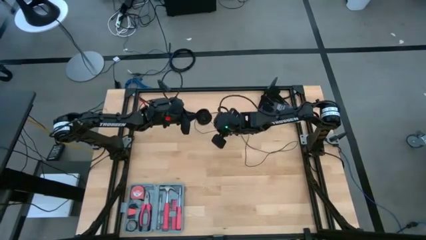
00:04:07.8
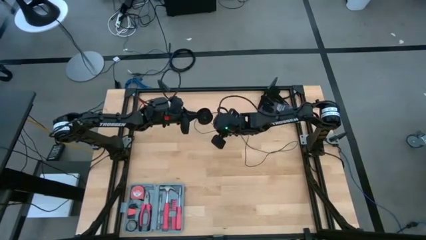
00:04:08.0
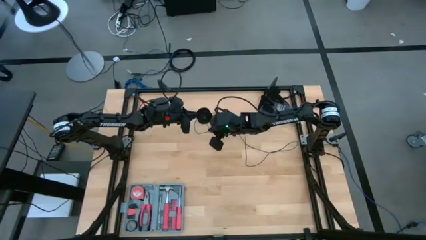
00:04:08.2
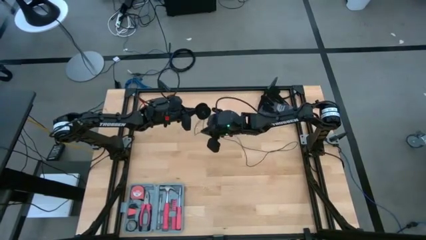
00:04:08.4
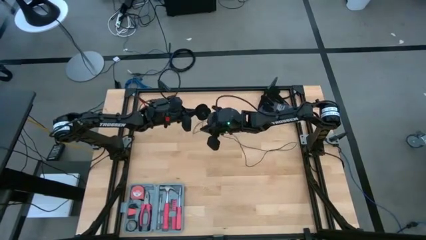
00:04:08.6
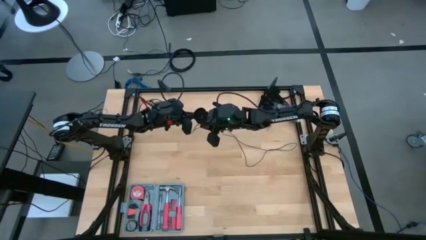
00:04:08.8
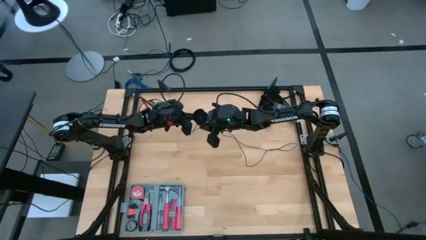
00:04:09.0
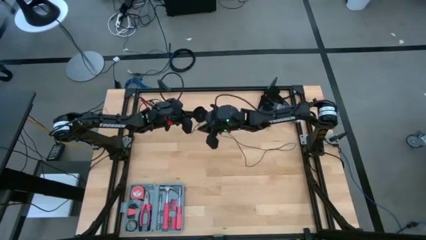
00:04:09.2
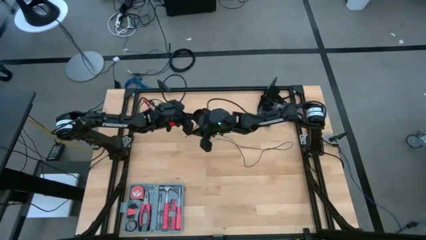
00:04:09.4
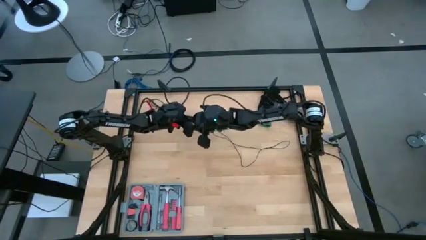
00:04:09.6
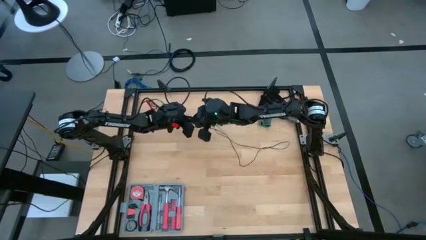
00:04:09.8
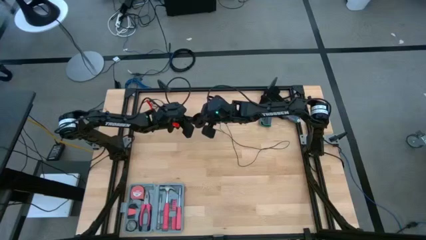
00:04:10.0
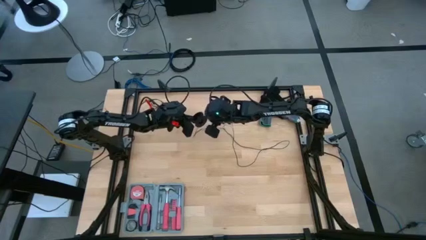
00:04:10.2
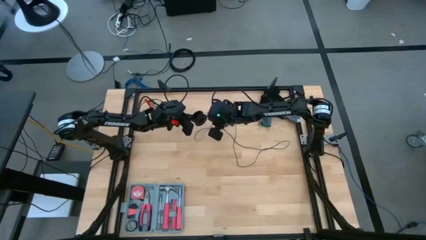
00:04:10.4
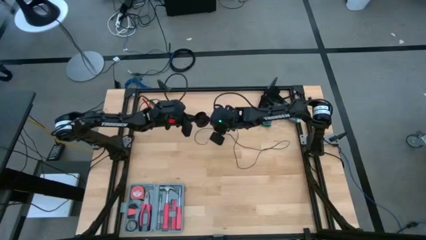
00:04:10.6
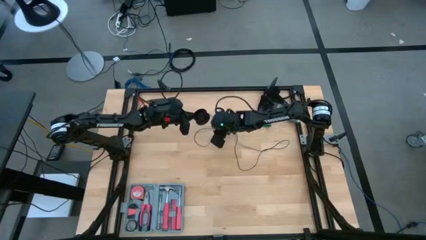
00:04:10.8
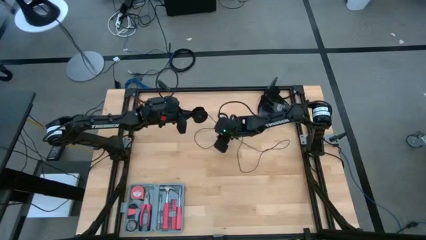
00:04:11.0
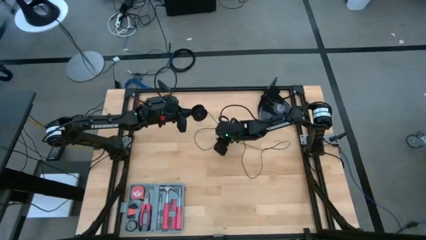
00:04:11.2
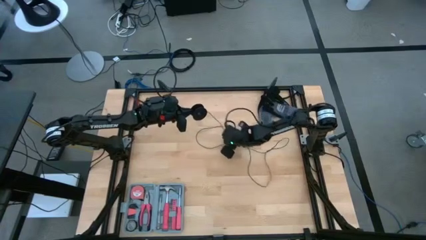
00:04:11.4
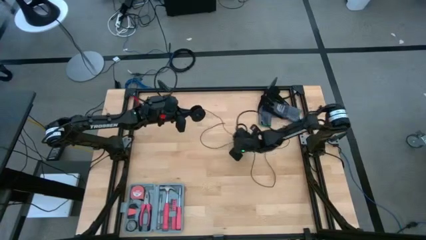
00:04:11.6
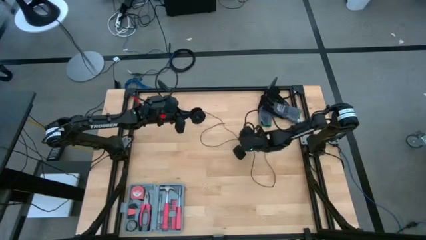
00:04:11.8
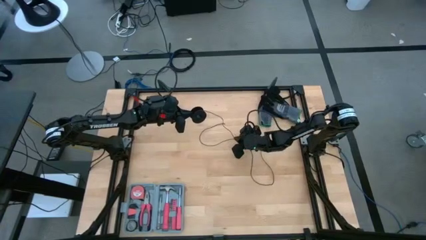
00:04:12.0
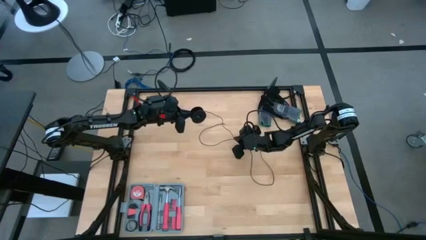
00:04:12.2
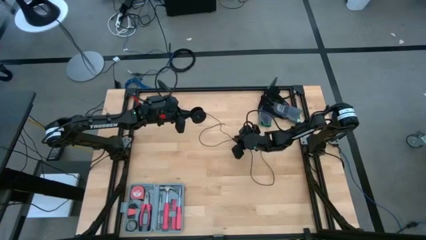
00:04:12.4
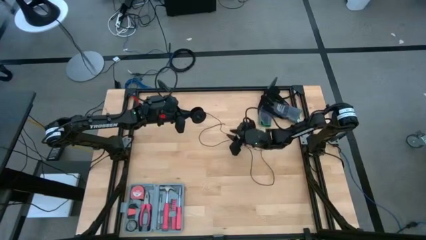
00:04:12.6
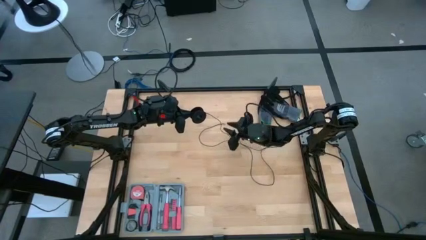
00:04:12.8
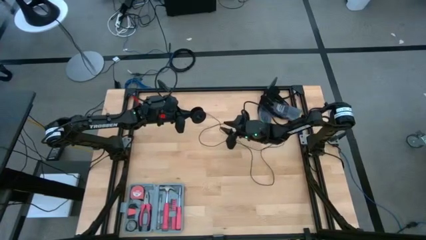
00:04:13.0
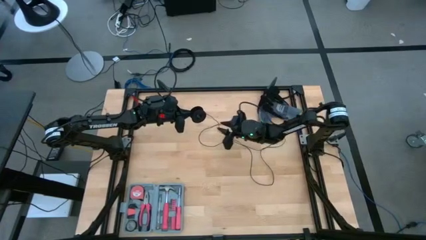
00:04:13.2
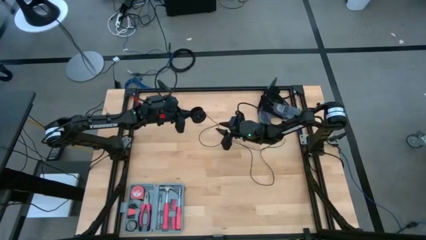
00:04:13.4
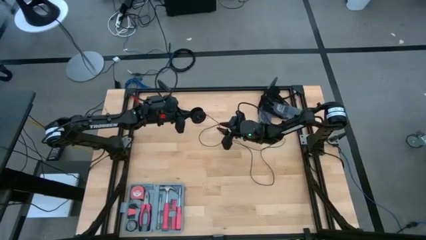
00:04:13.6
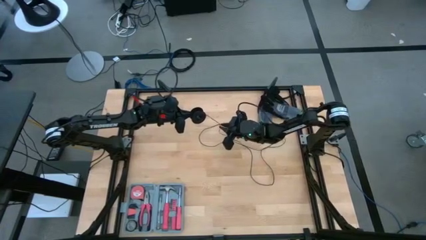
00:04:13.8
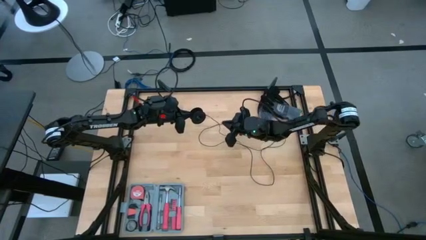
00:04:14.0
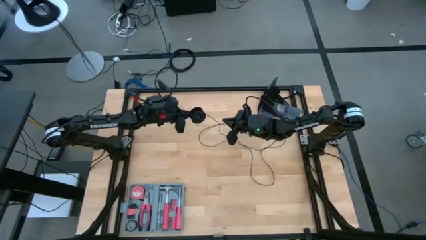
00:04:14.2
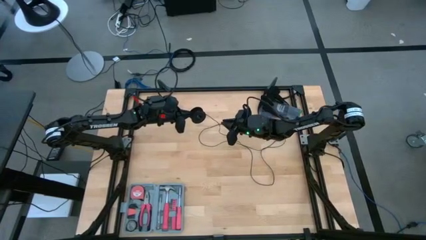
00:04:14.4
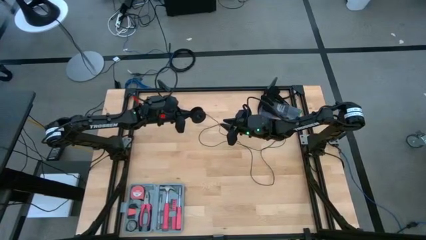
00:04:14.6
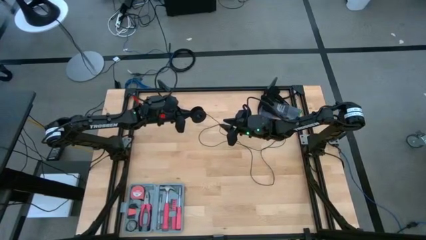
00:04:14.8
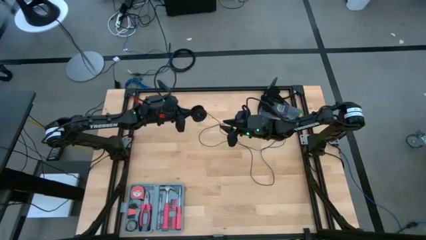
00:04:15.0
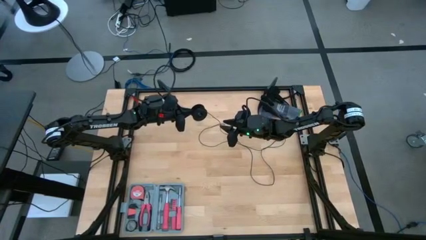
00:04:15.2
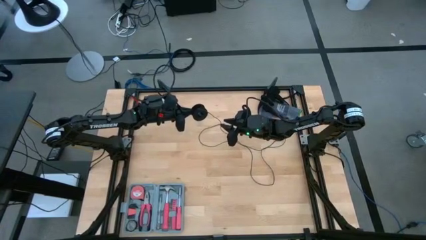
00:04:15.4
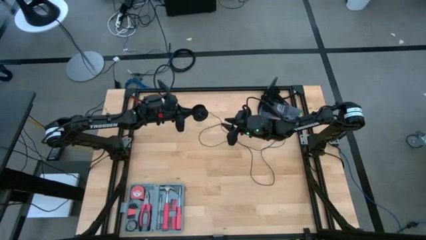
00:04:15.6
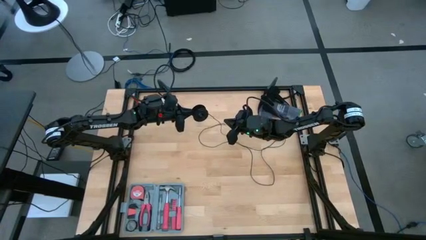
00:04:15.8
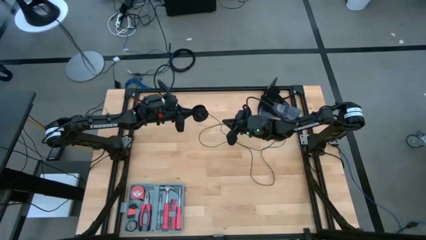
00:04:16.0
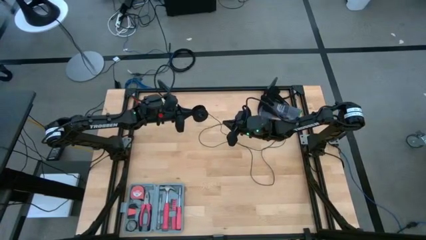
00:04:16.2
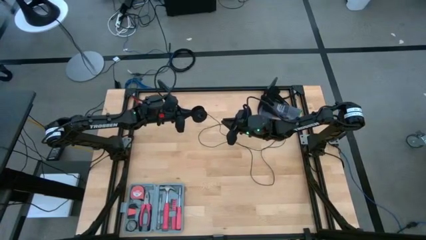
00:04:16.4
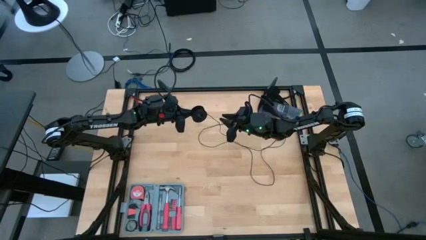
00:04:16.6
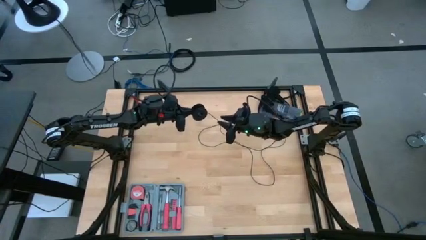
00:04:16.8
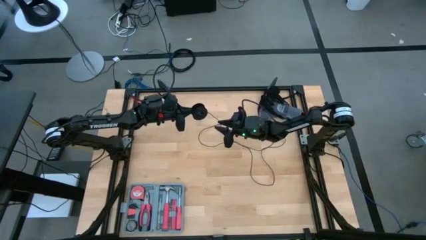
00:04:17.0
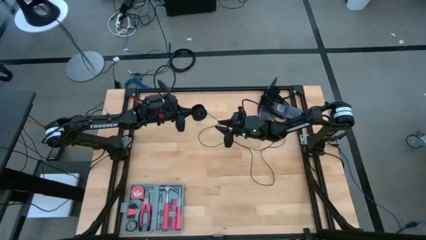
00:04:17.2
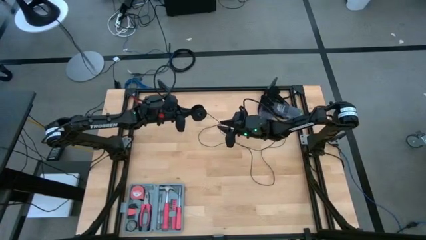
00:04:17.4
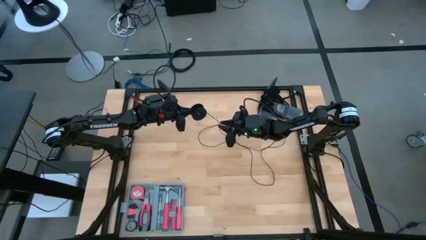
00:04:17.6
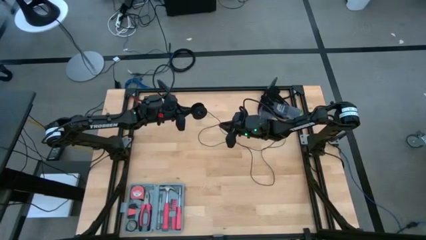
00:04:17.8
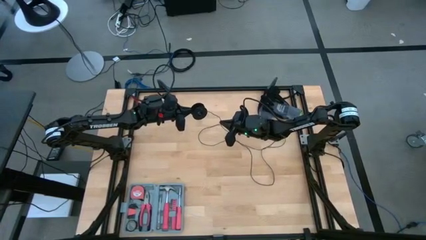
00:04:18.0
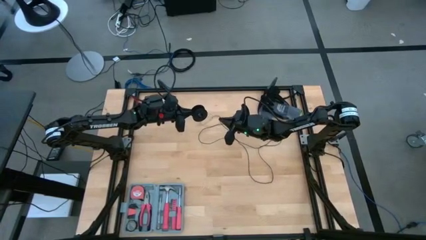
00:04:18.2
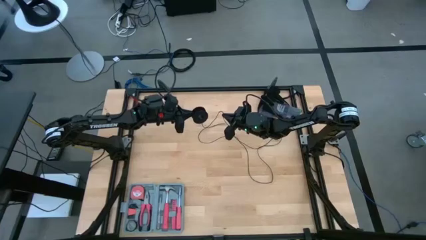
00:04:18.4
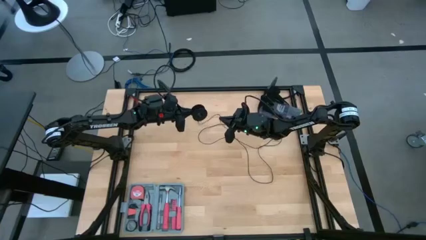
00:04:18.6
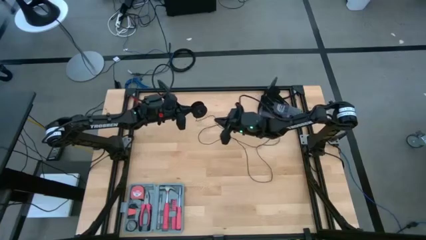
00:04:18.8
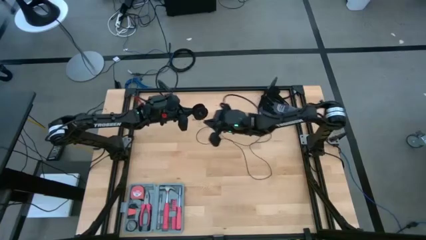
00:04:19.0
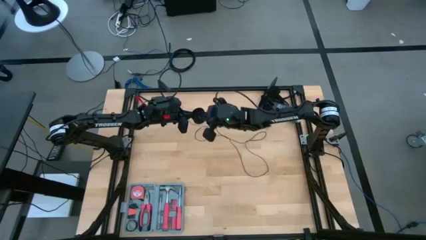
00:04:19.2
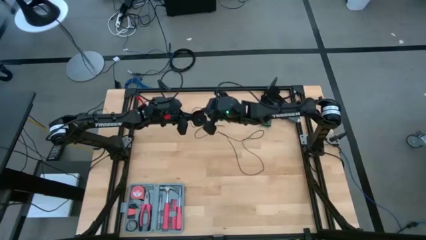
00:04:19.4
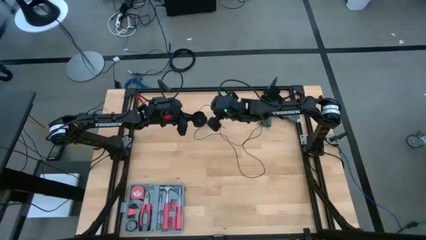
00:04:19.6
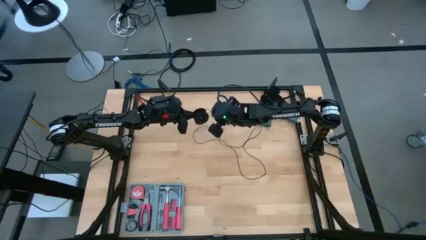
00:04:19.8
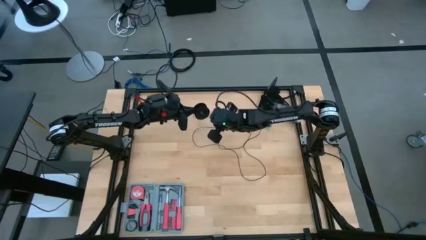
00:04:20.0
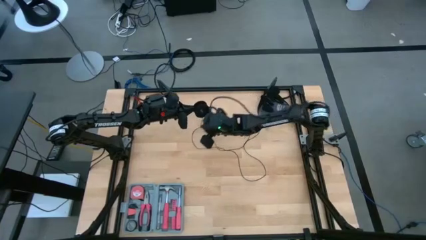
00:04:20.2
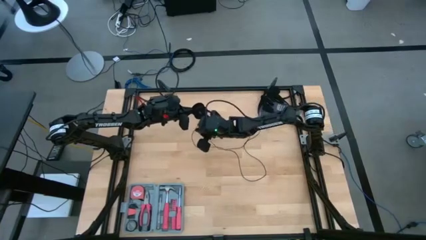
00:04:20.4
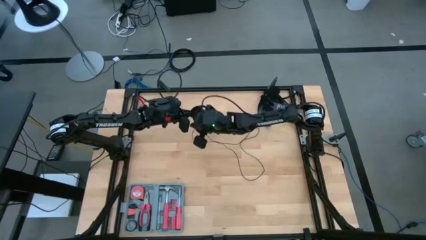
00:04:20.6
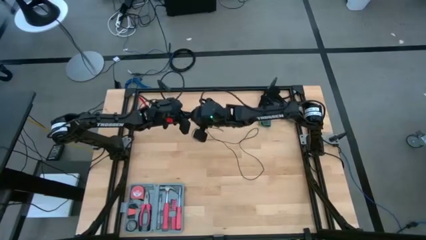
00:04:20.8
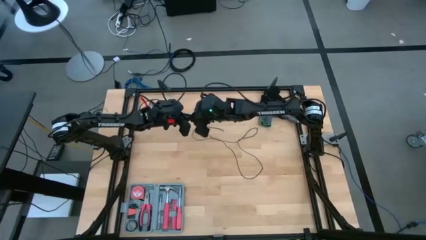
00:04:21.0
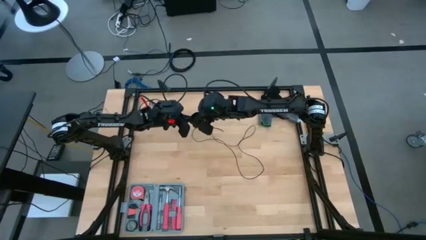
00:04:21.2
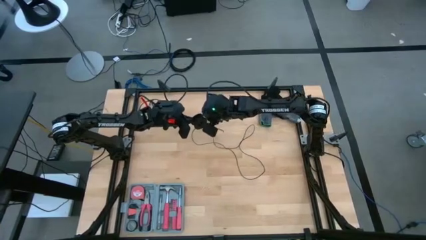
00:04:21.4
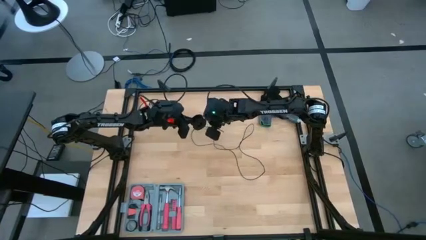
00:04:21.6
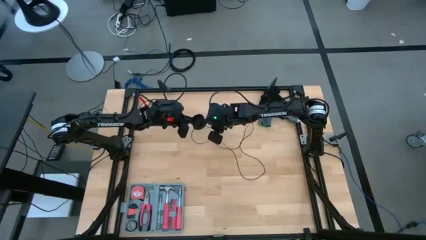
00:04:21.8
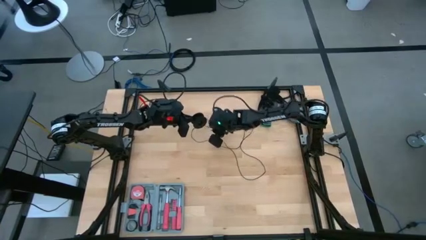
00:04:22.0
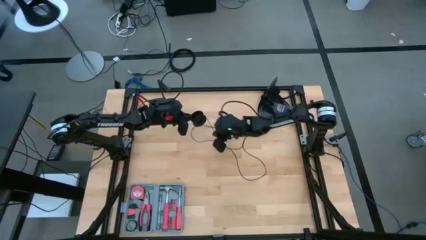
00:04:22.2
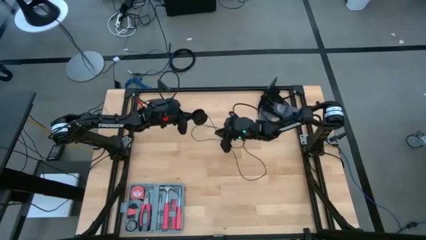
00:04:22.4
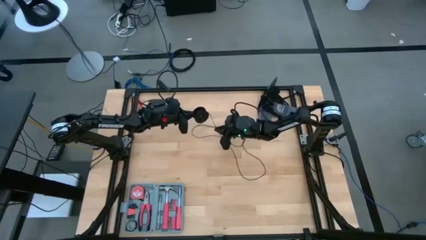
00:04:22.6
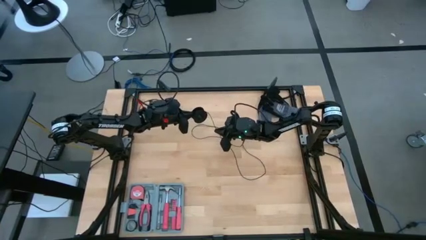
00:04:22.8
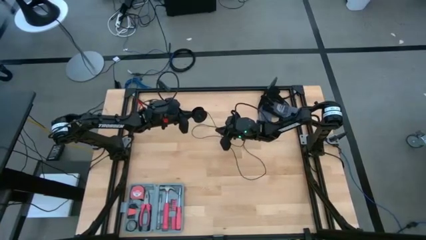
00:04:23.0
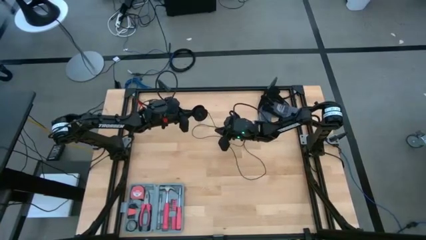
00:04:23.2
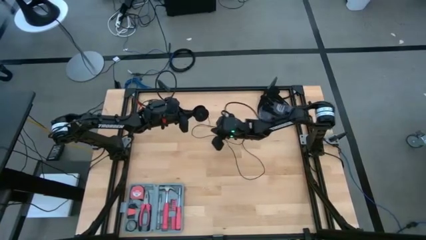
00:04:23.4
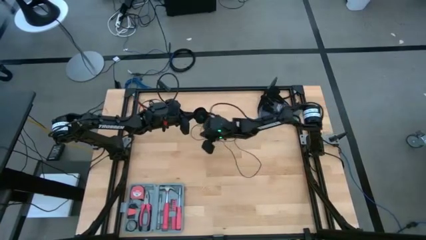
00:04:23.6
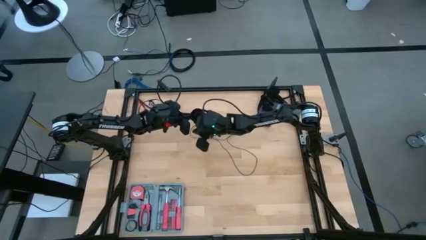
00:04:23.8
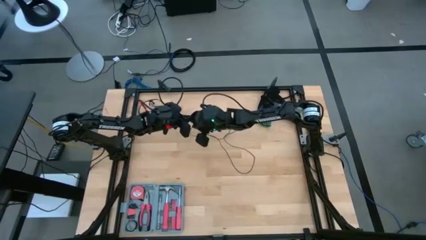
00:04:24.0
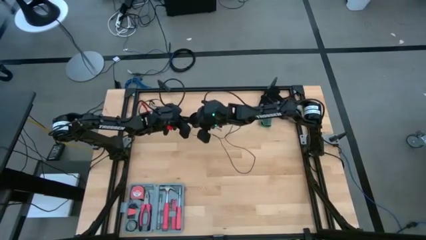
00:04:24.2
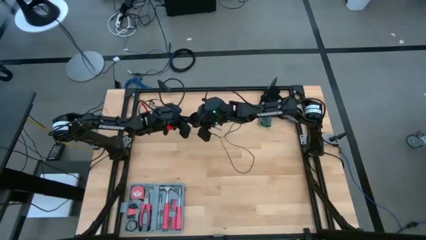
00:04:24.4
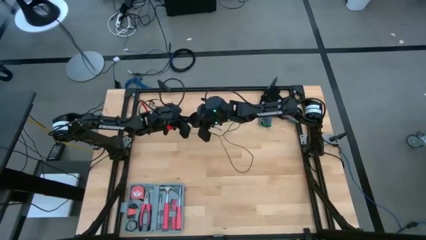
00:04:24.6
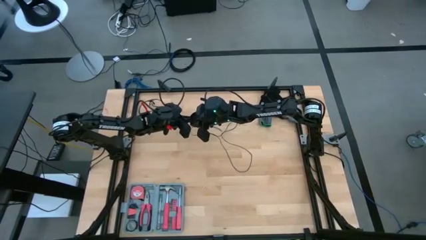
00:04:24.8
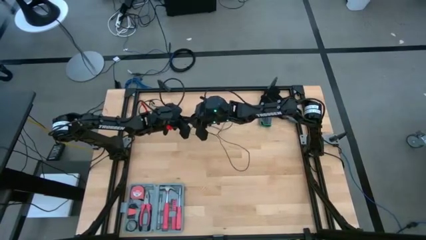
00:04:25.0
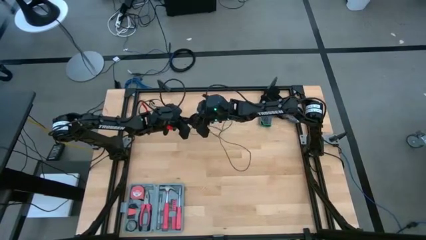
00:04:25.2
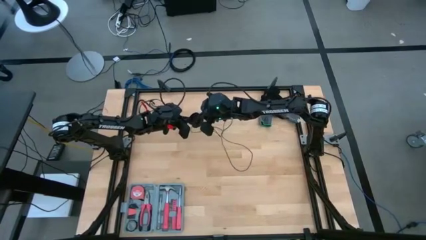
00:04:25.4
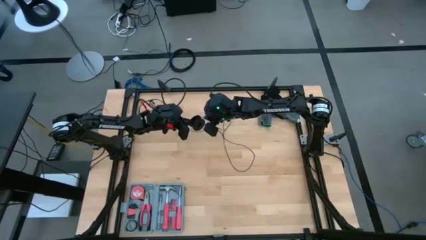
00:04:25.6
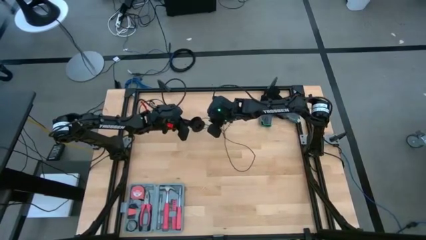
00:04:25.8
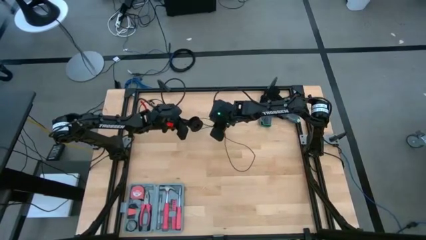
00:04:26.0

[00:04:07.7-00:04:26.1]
Task: Coil cords
Coil the black wire onto the black spool
